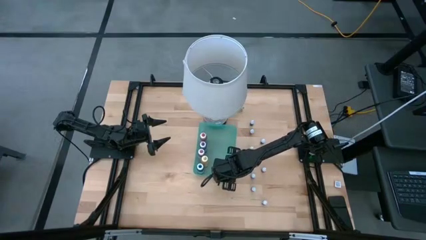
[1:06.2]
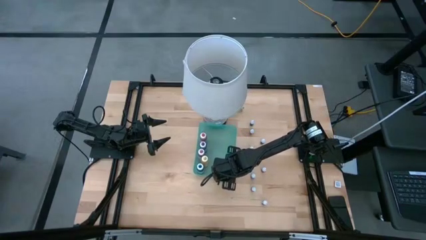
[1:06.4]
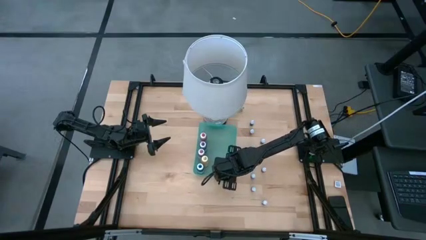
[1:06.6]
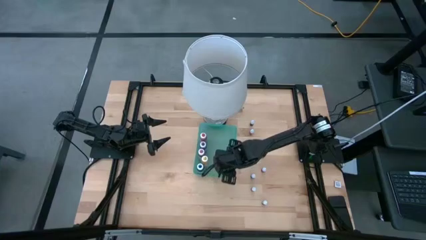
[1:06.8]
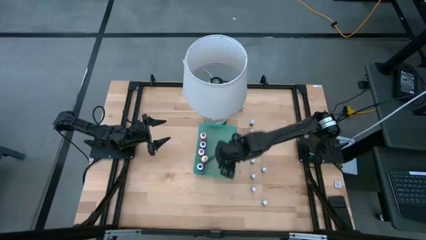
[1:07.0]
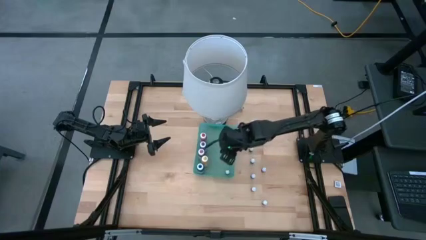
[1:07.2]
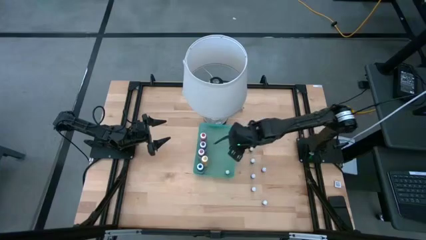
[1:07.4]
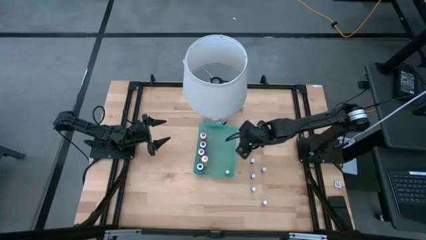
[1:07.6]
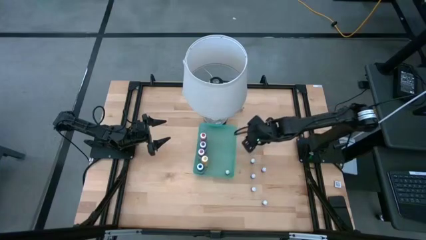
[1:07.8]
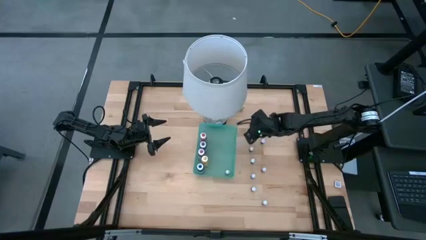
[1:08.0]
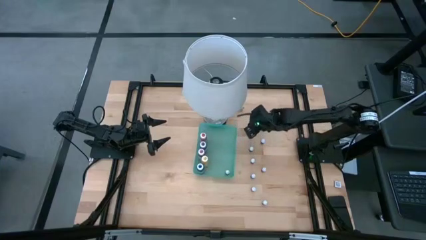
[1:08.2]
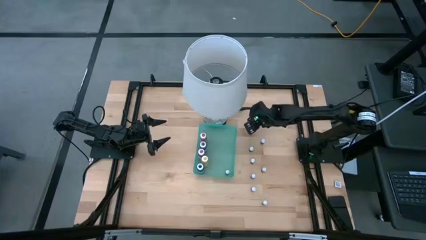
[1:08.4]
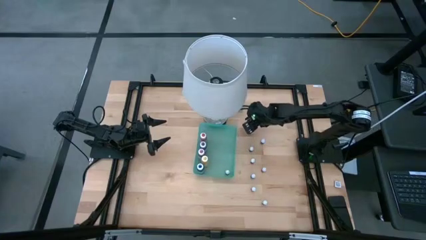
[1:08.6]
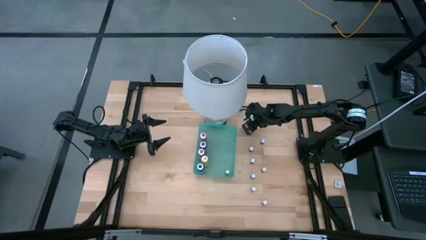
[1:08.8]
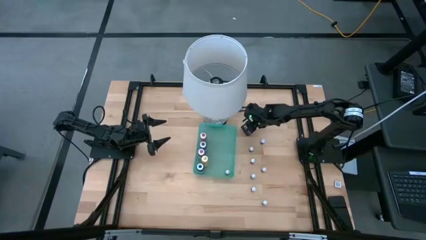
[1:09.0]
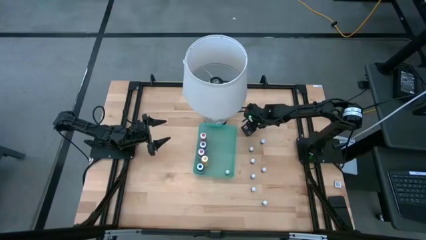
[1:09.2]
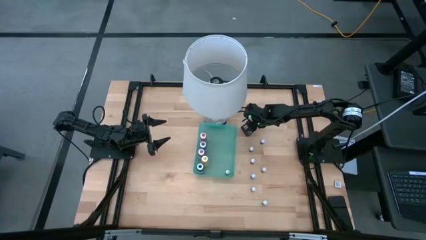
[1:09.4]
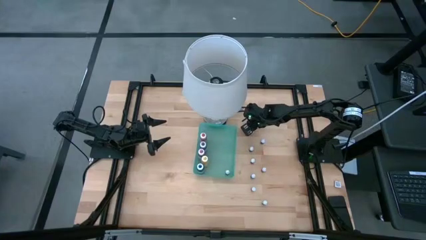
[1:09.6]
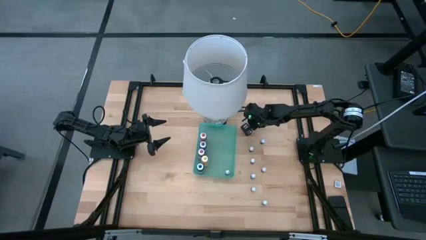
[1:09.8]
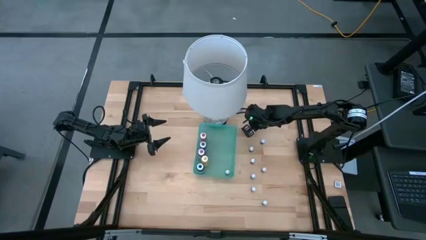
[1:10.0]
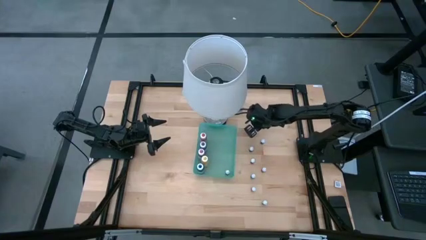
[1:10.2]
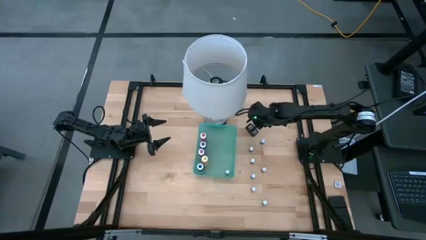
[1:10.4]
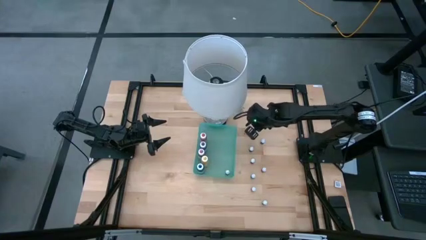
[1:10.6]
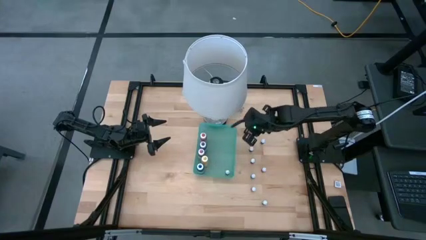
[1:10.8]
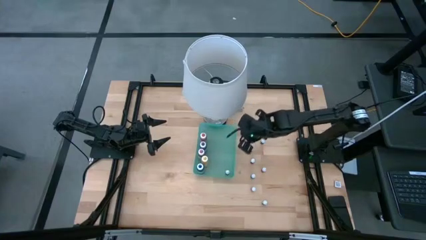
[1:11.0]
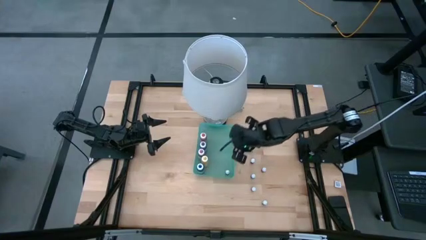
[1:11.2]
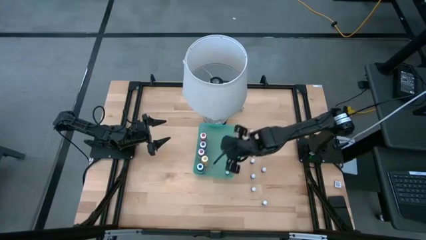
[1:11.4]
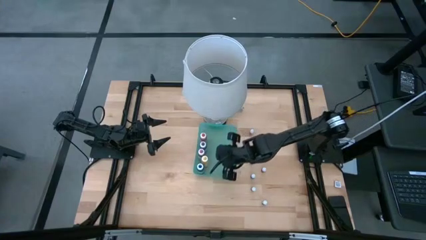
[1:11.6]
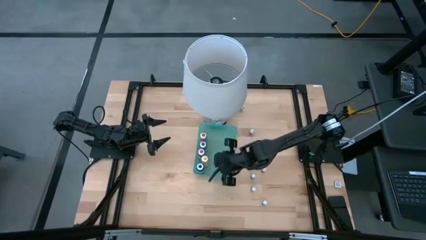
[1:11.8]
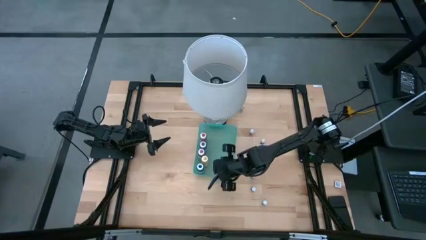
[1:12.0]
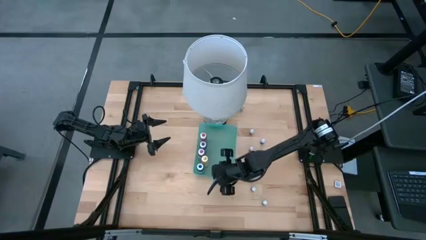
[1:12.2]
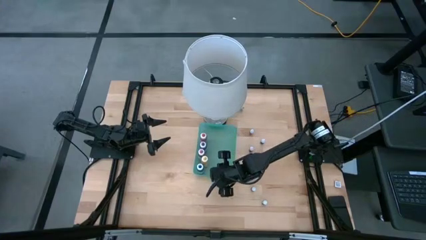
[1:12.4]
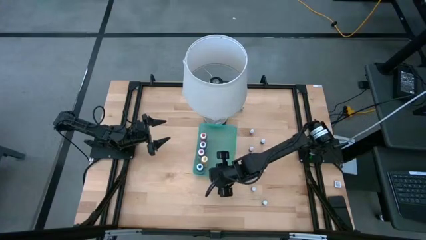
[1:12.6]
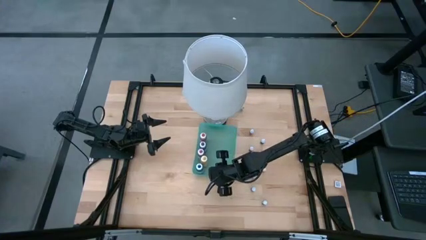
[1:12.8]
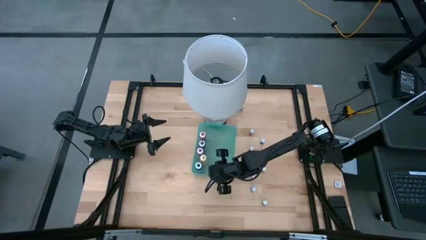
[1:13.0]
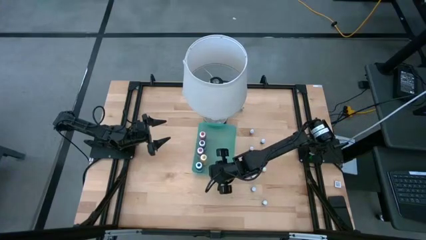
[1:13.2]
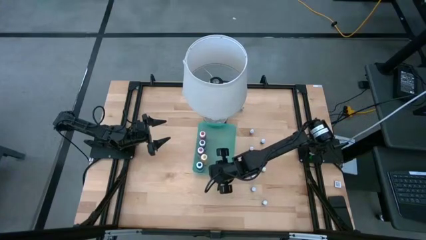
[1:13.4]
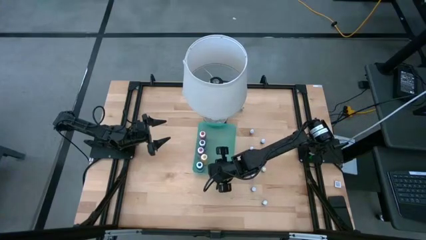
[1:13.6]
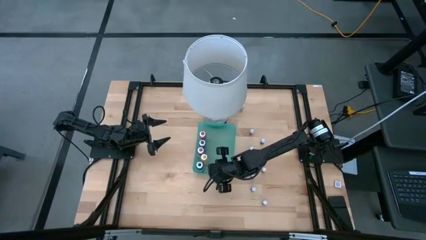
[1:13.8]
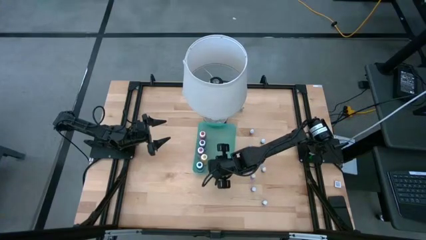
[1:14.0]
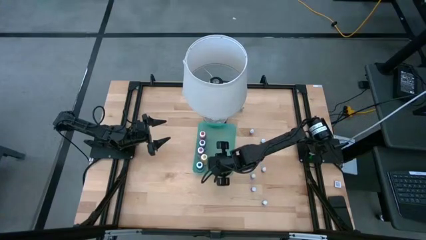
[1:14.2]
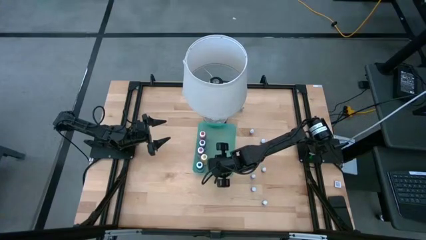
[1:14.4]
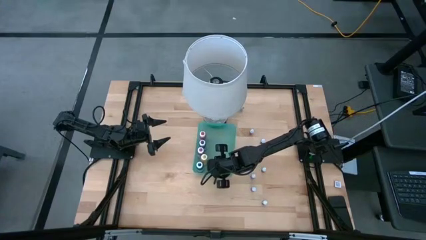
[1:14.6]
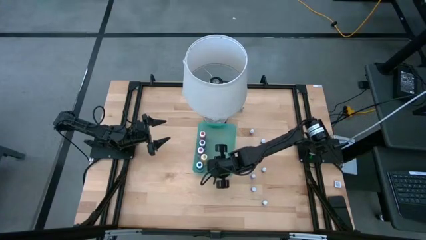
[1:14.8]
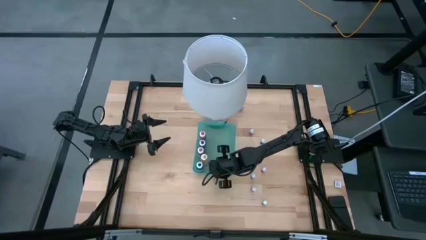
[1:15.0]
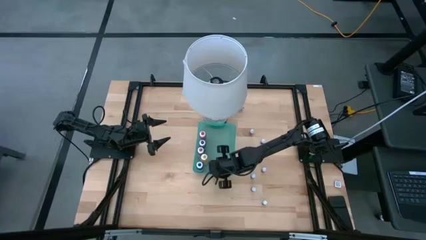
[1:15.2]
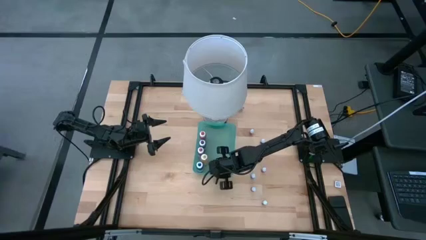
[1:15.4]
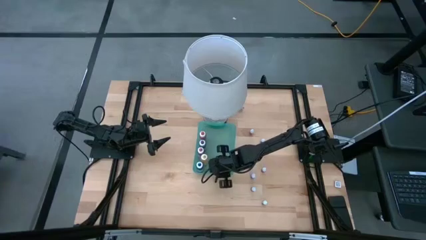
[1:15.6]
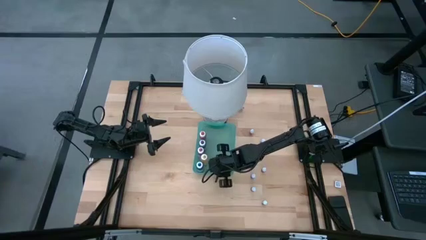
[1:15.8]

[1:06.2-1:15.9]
Task: Pick & Place food coloring
Put the small black food coloring bottle into the green bin

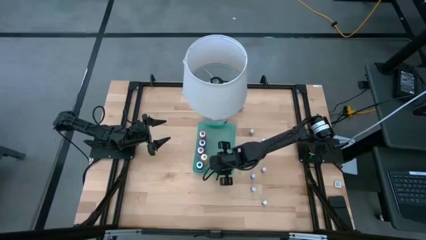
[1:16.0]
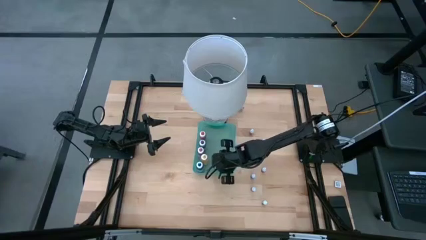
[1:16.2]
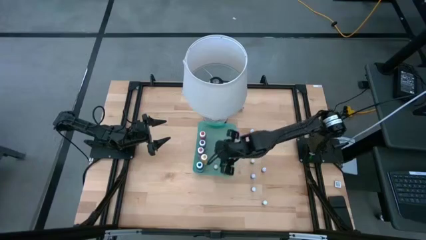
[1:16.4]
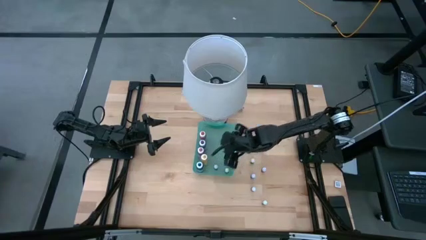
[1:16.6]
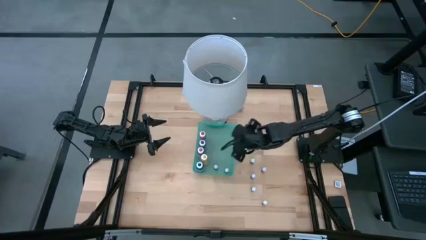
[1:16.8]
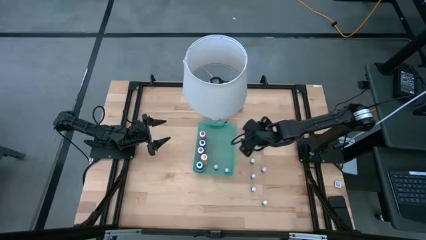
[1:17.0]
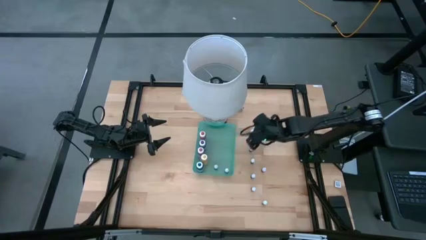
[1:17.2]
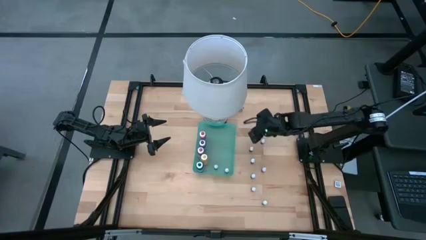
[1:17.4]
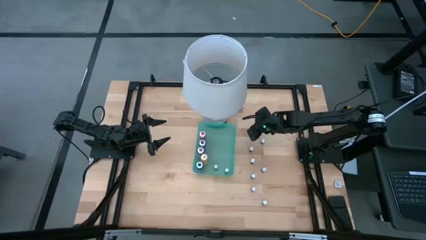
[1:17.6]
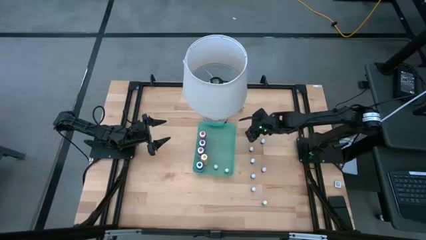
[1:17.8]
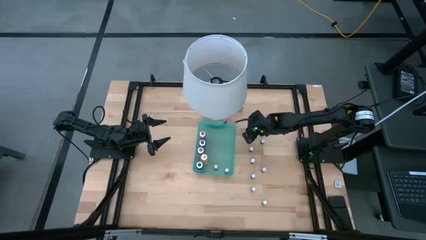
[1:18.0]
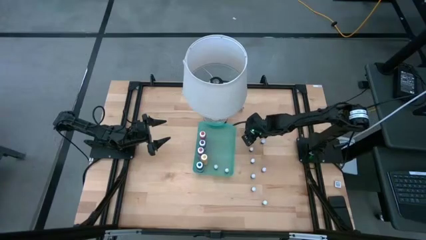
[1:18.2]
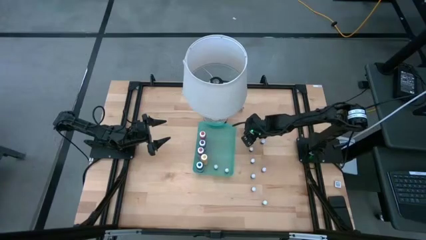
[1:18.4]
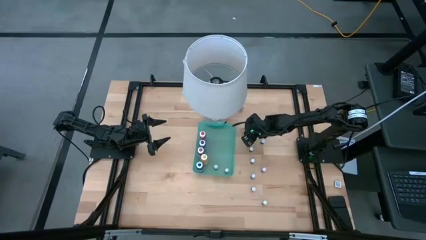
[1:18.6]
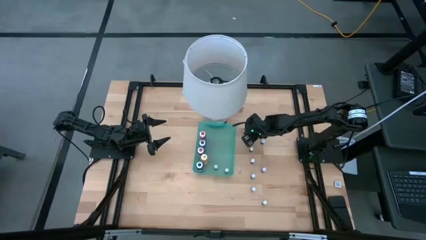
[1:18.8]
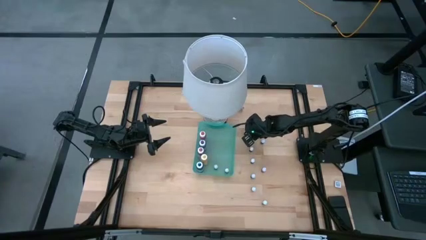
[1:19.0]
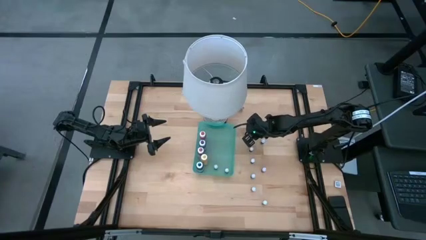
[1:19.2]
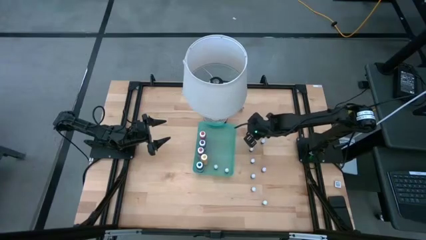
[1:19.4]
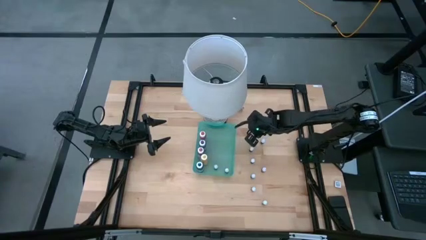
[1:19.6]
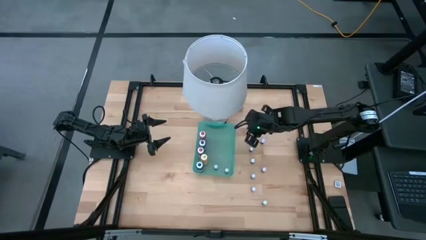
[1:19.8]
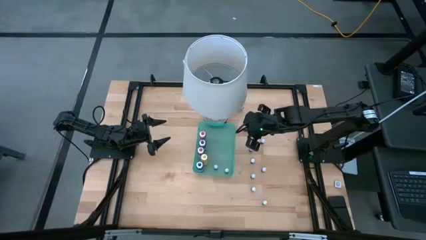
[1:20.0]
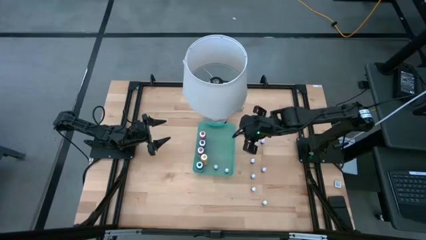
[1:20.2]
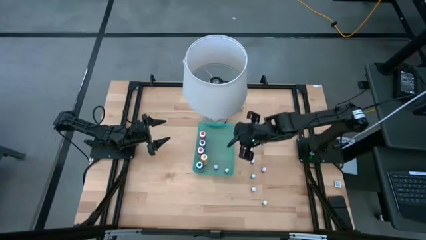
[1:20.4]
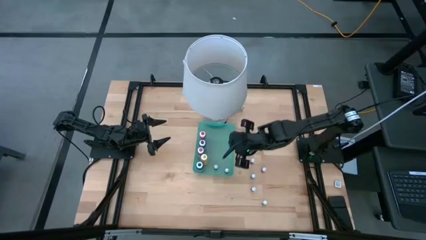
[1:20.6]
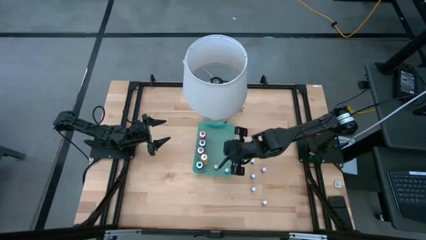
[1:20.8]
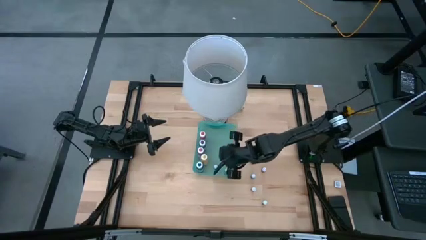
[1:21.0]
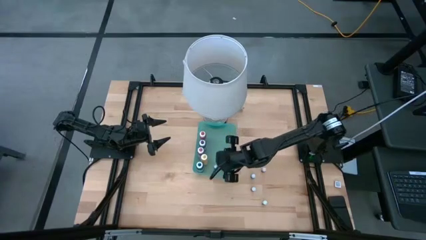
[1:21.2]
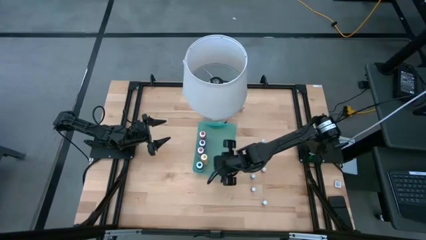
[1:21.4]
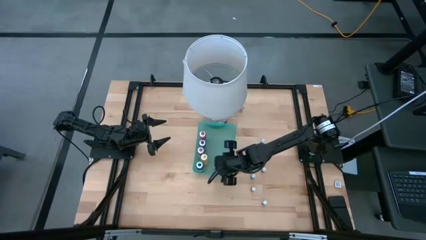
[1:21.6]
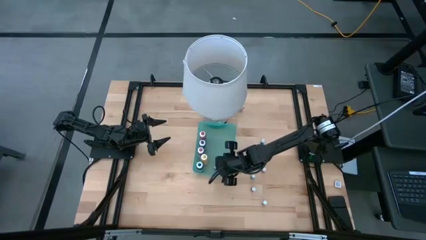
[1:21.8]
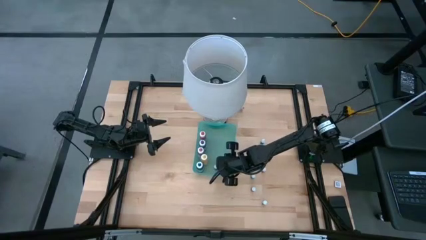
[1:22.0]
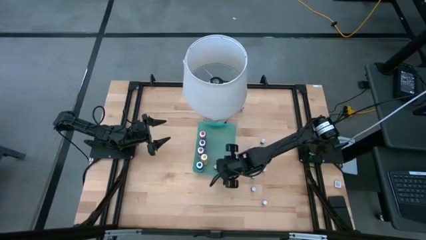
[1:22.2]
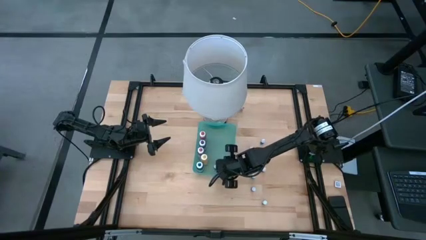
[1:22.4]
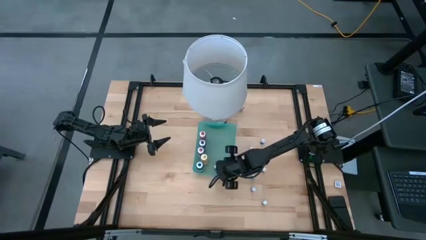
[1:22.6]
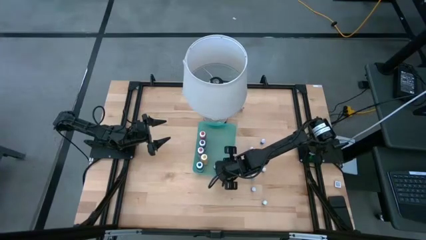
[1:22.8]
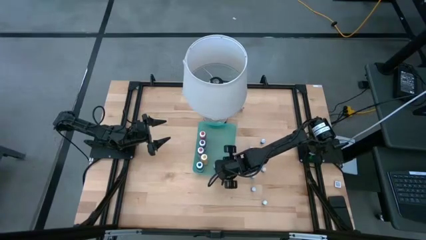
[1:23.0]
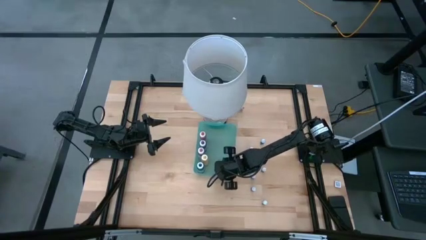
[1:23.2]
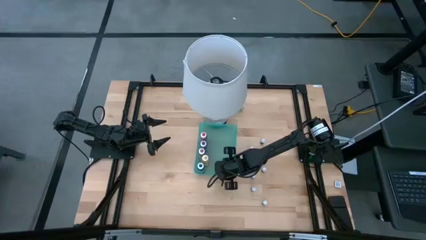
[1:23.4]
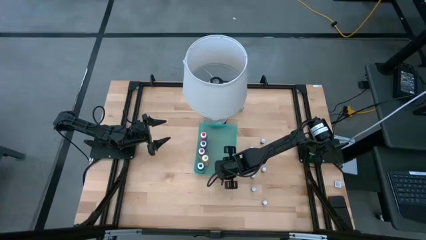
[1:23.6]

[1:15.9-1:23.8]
Put the small black food coloring bottle into the green bin
